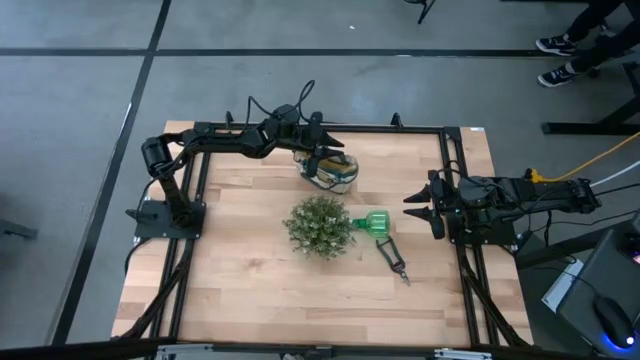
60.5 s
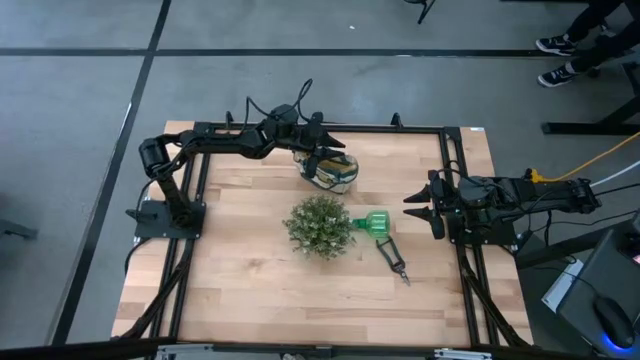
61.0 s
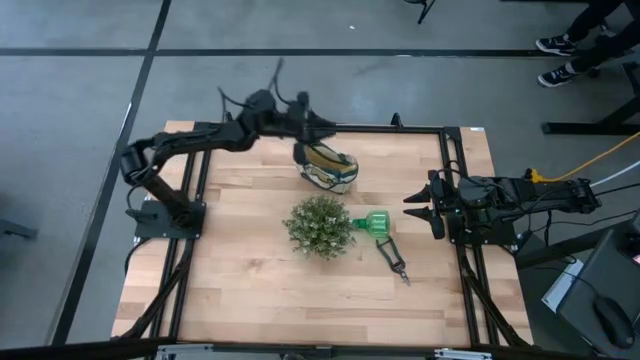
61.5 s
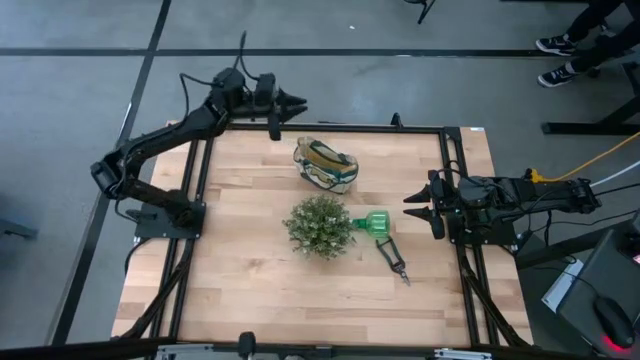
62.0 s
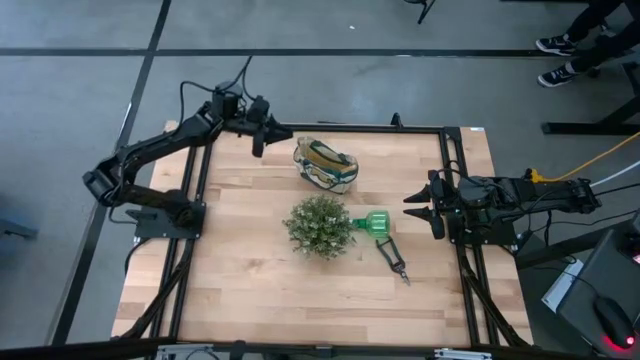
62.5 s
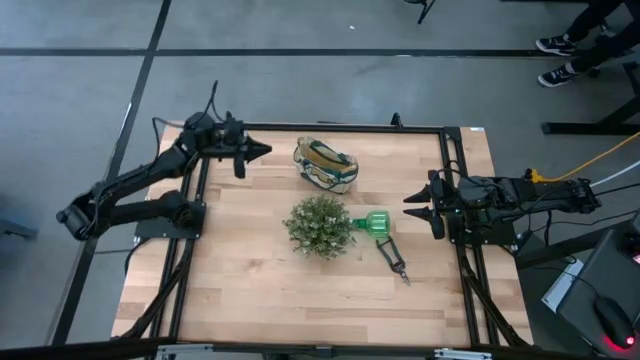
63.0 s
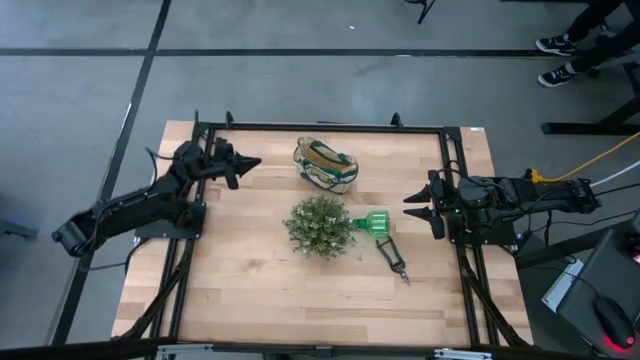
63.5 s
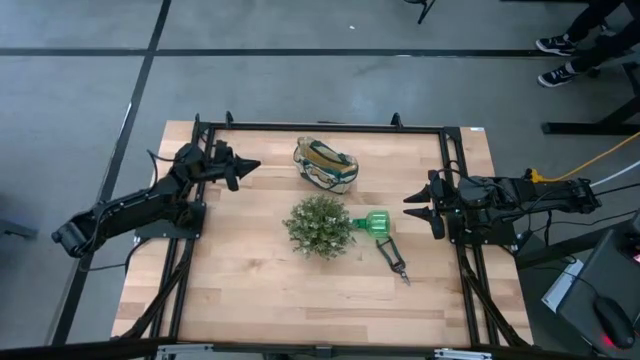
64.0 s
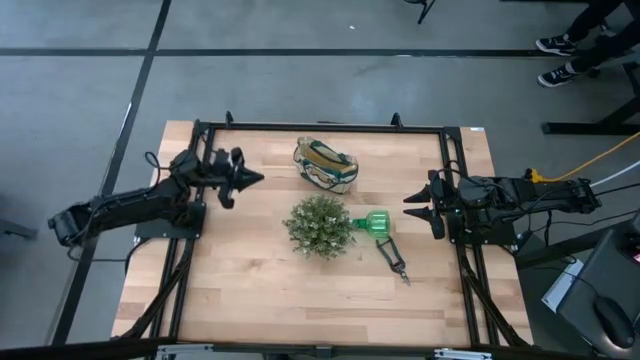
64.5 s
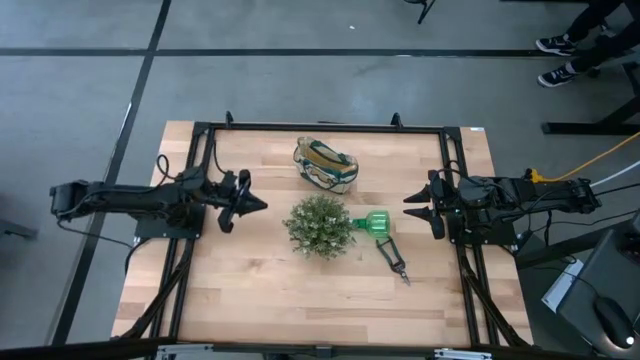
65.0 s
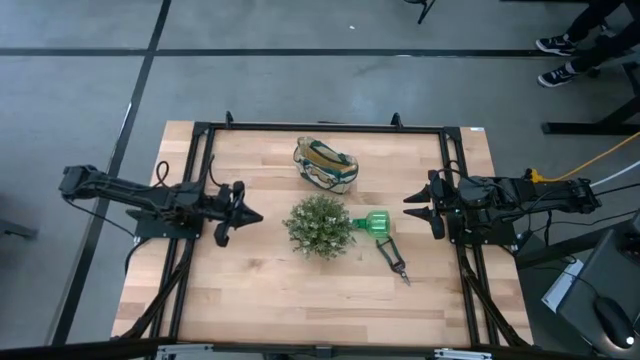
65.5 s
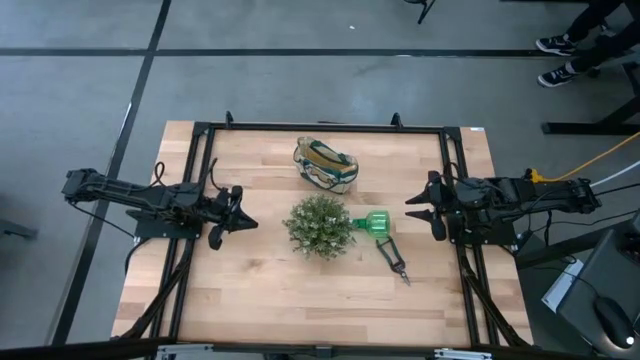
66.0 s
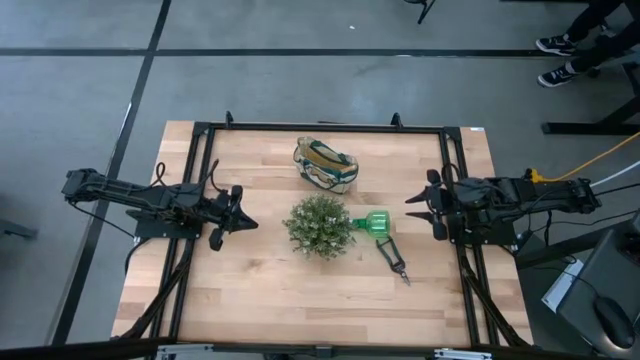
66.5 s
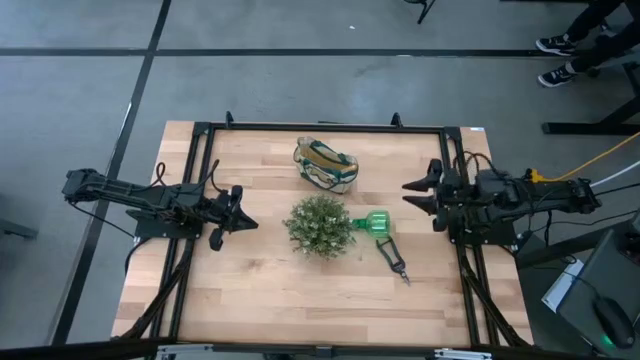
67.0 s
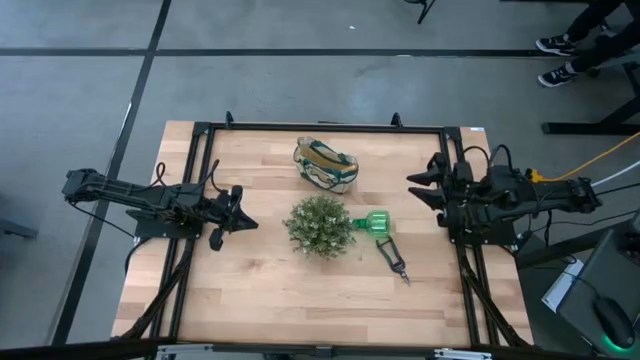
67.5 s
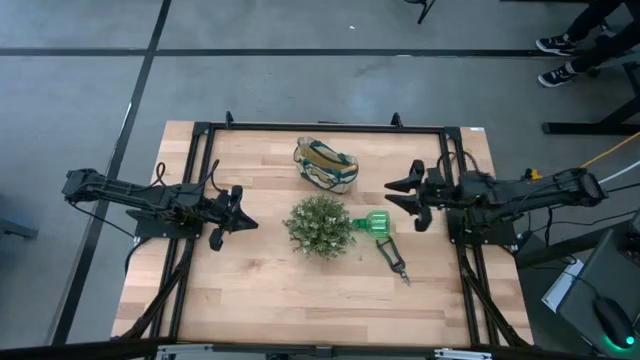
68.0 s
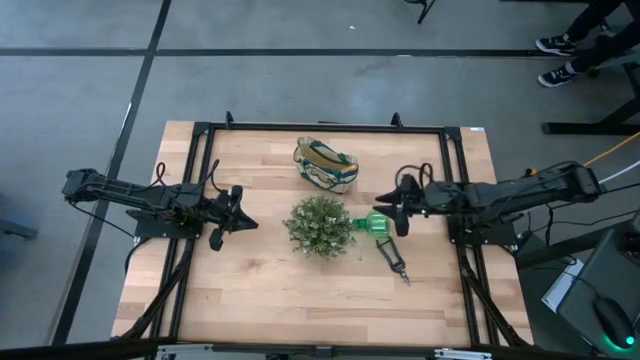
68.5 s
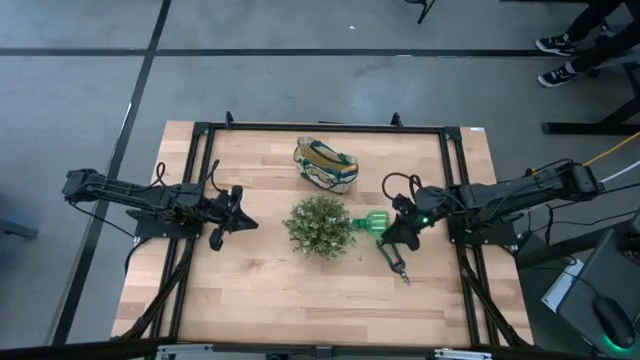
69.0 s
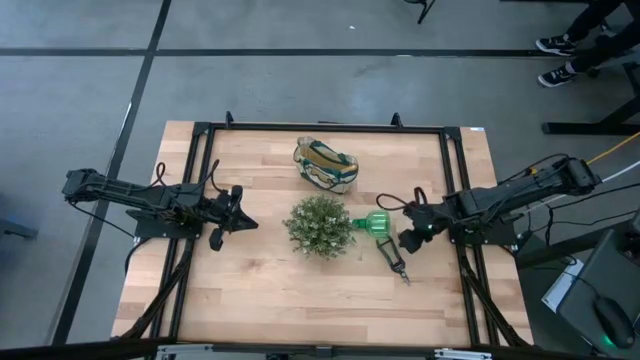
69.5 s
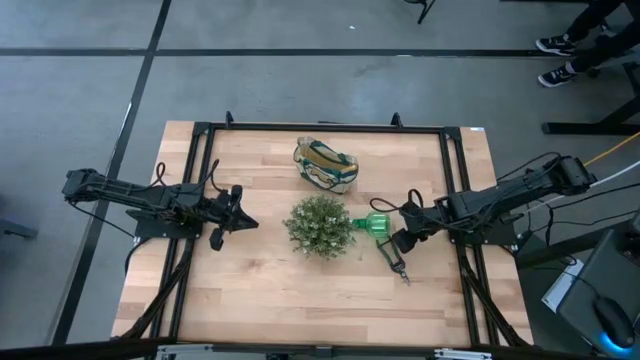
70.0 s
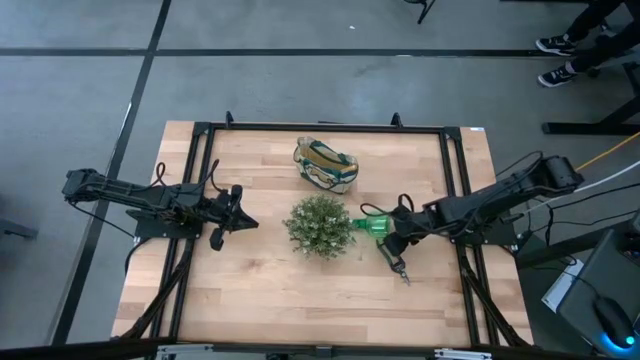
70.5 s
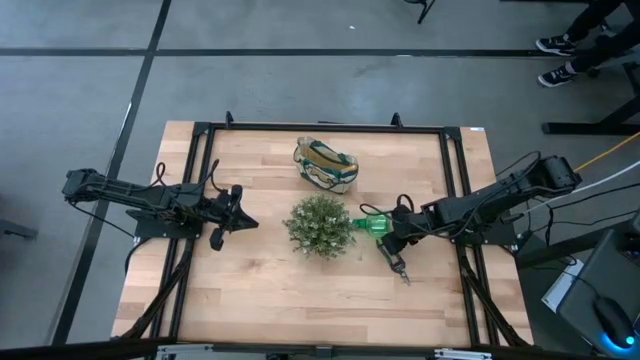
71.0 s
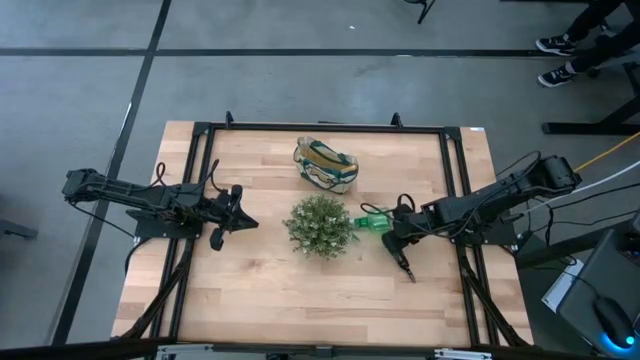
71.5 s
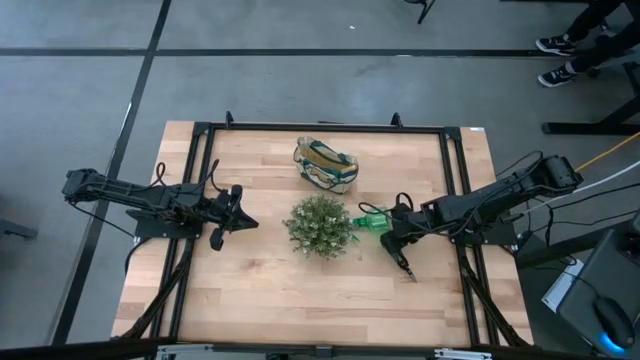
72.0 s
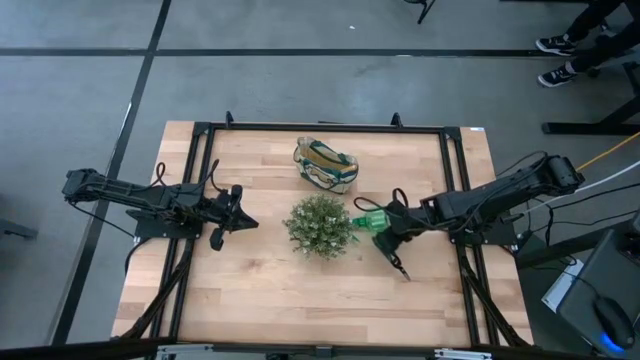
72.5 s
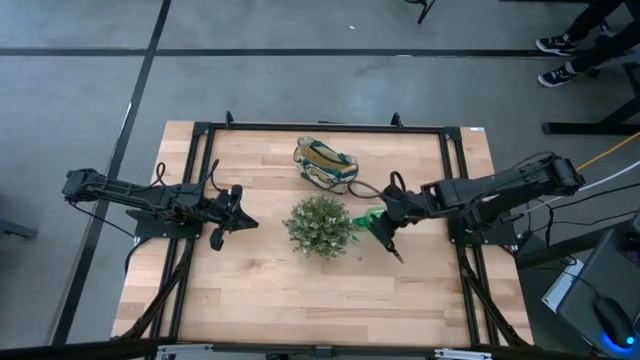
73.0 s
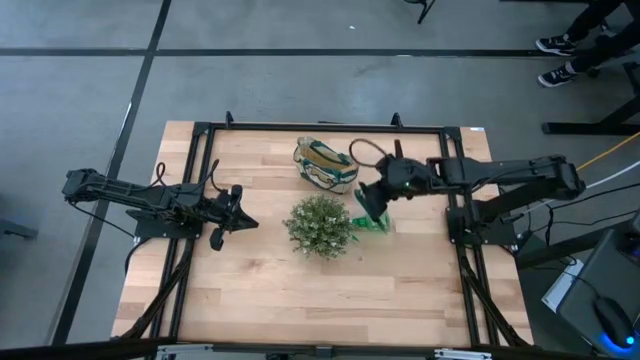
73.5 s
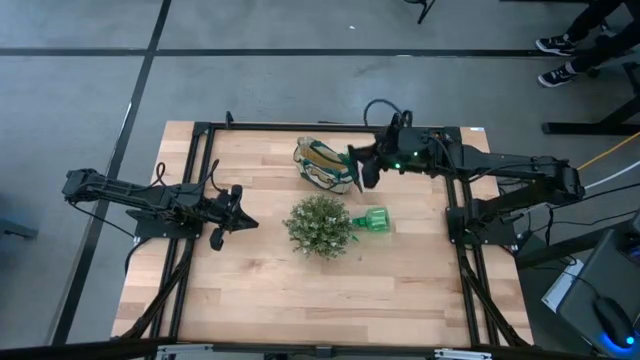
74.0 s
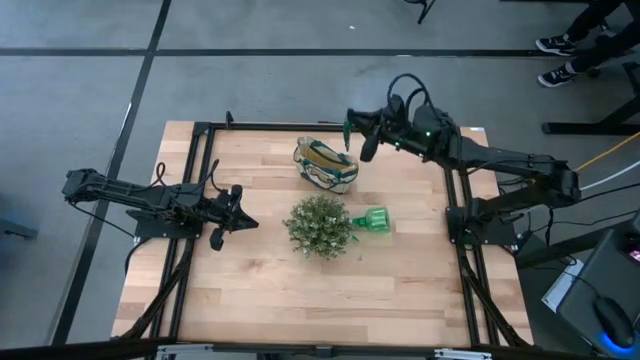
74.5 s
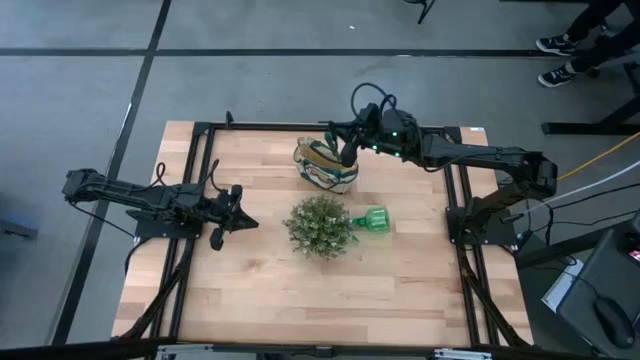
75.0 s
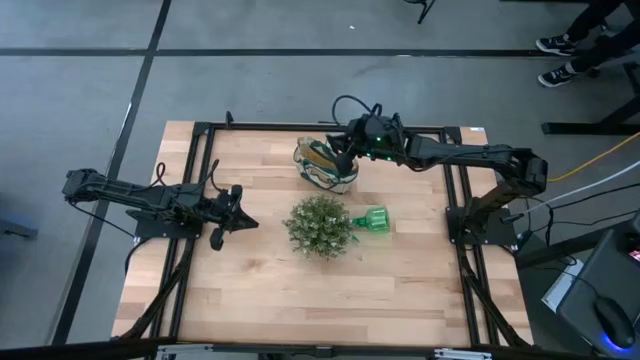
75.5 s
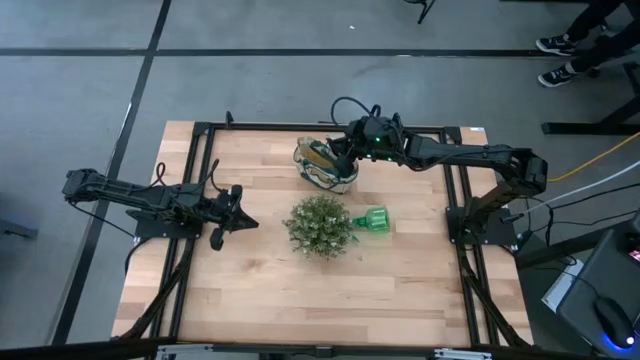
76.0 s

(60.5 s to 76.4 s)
Task: Pick & Place Garden tools in Gardening bag
Put the green fruit pruner into the green gardening bag

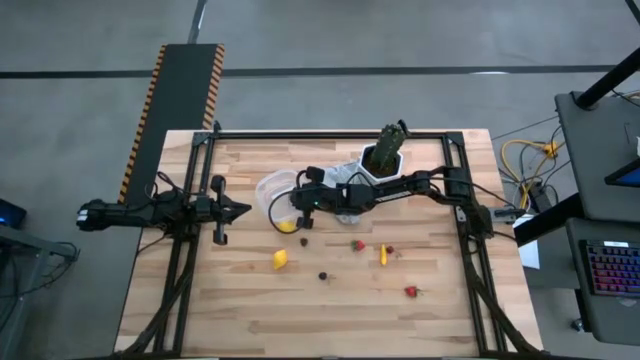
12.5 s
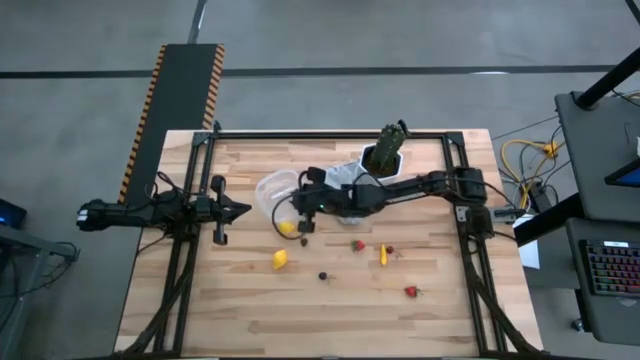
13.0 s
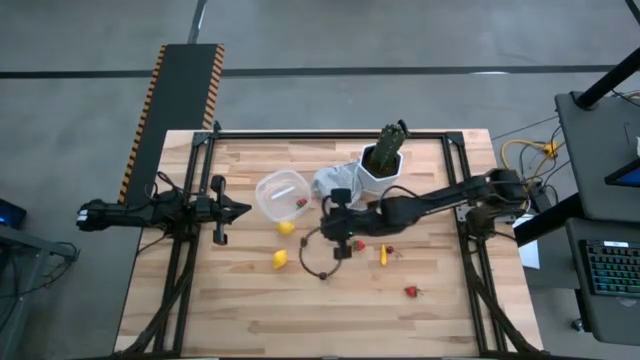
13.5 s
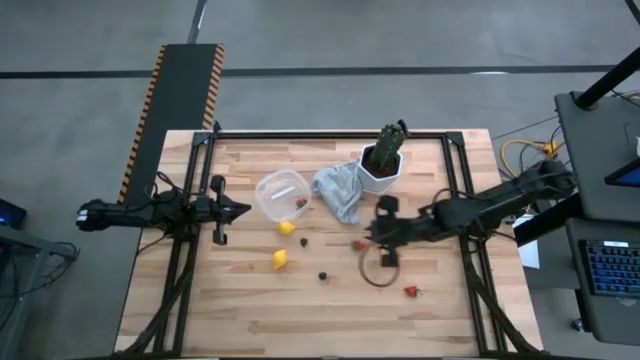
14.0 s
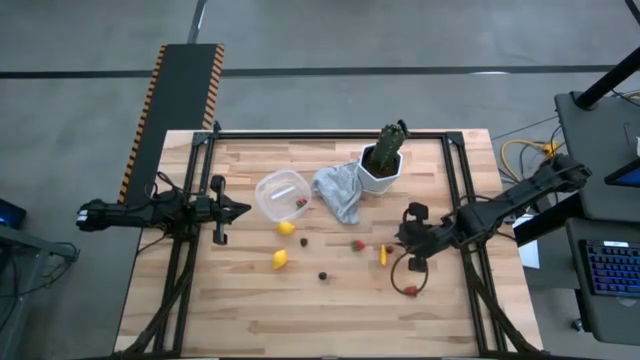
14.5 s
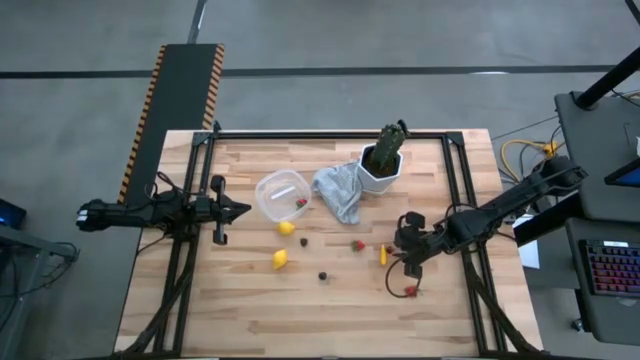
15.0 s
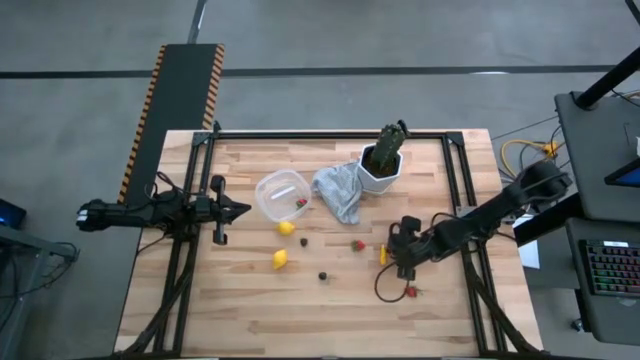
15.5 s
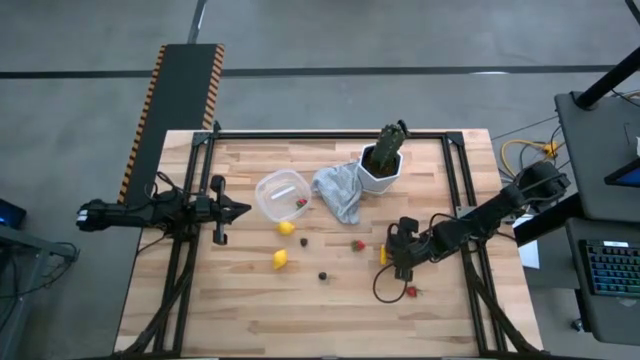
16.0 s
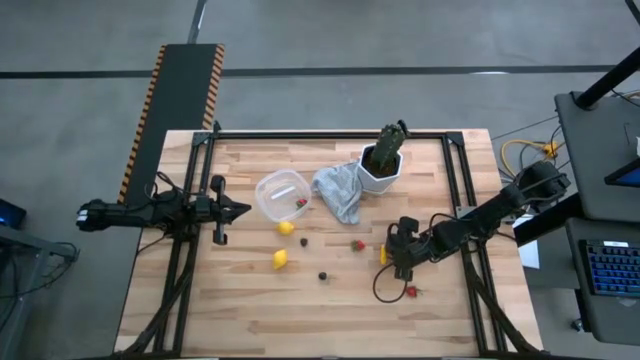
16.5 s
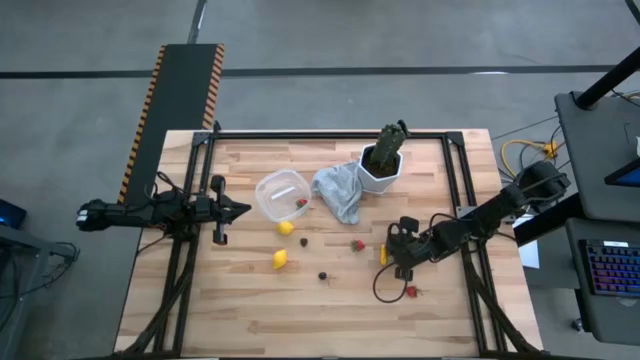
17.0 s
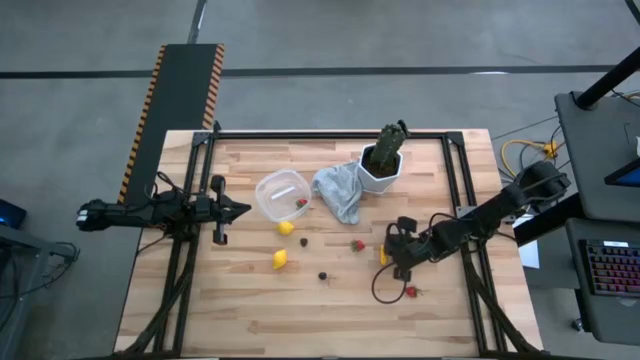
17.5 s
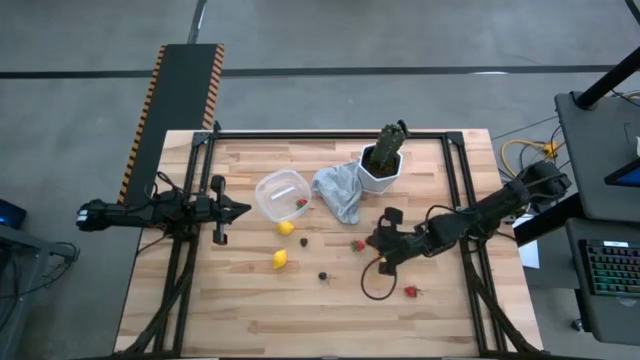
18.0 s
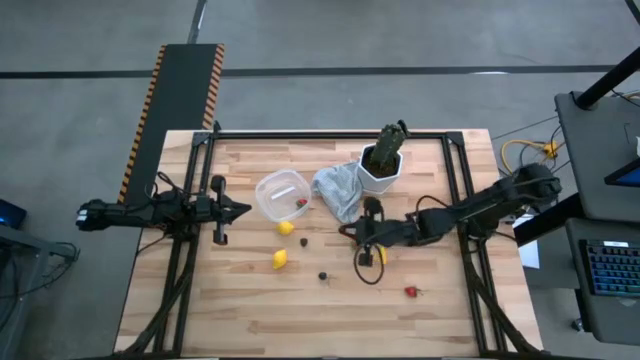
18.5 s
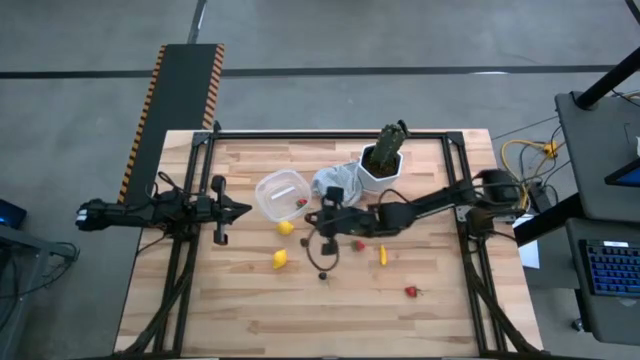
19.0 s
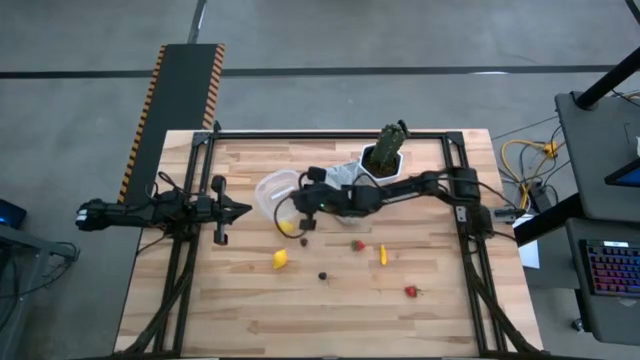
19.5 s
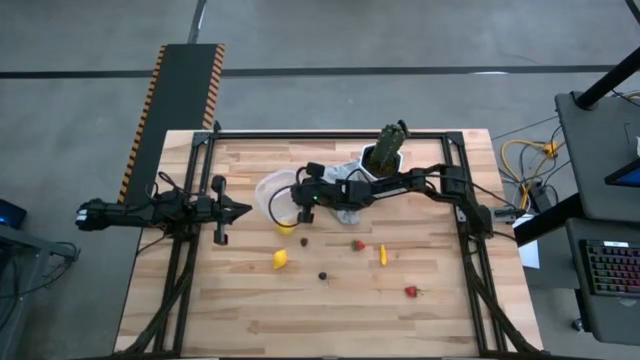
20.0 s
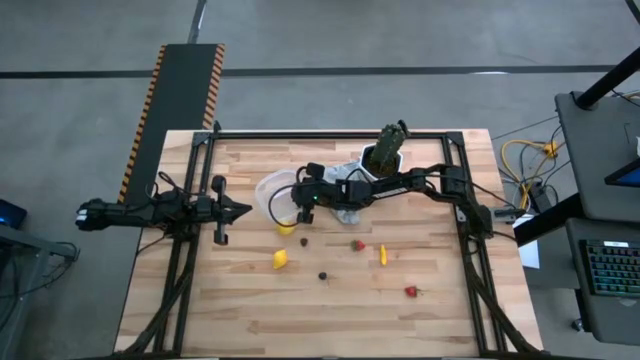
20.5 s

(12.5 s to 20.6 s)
Task: Pick and placing Produce into tupperware
Put the red cherry into the transparent container
